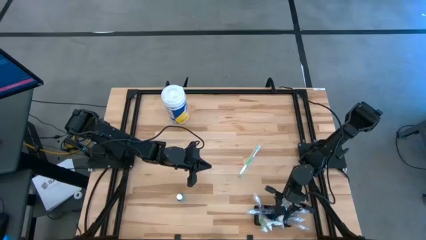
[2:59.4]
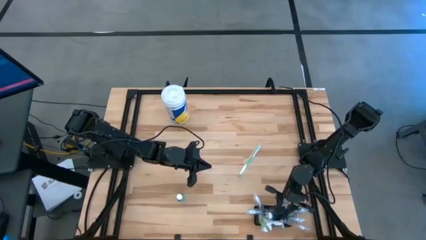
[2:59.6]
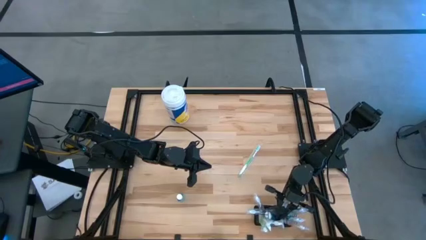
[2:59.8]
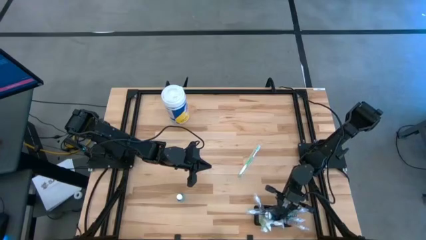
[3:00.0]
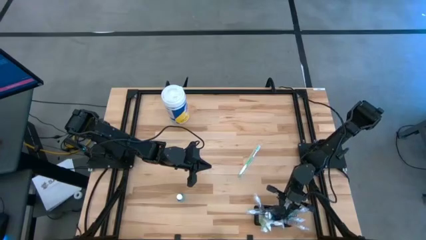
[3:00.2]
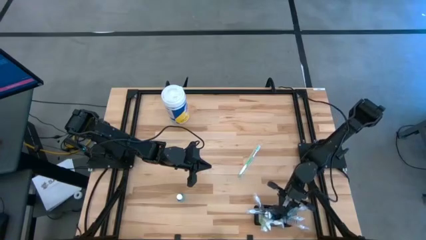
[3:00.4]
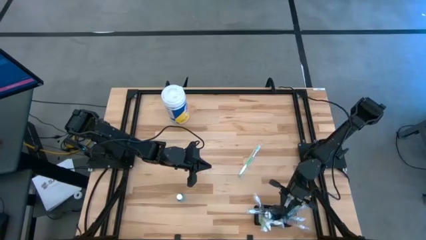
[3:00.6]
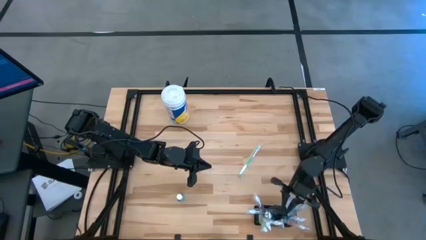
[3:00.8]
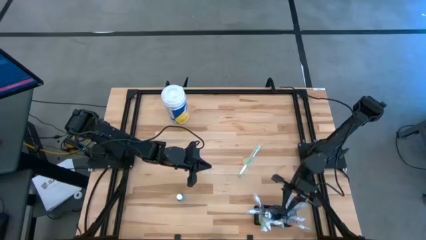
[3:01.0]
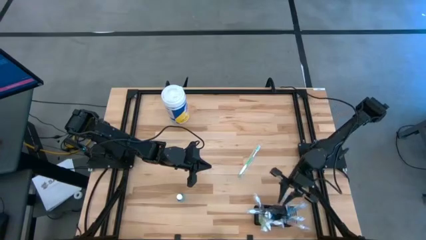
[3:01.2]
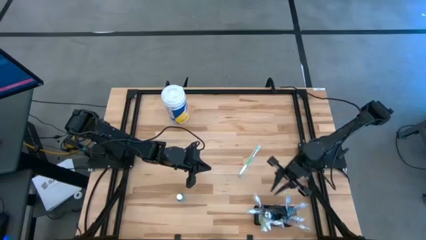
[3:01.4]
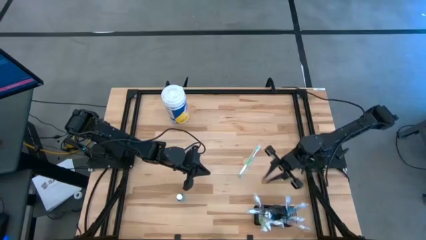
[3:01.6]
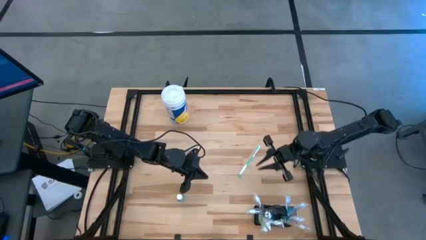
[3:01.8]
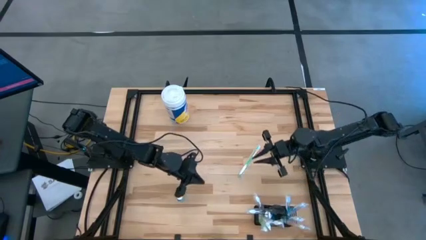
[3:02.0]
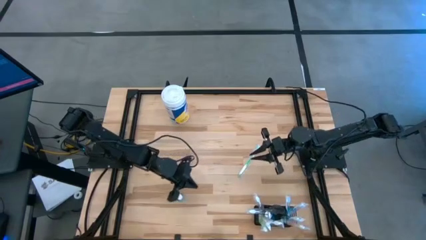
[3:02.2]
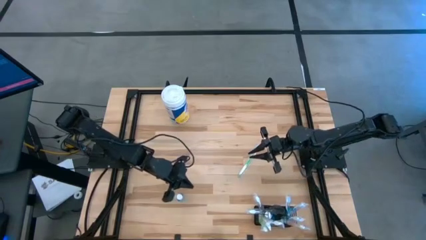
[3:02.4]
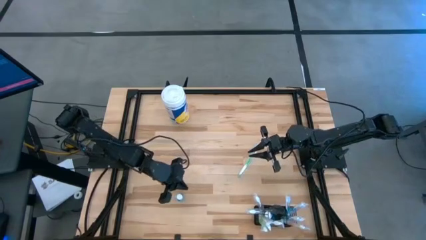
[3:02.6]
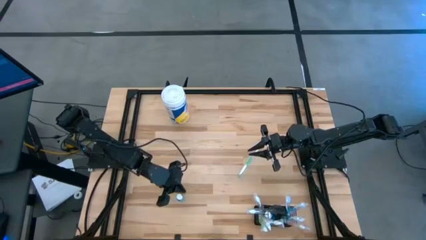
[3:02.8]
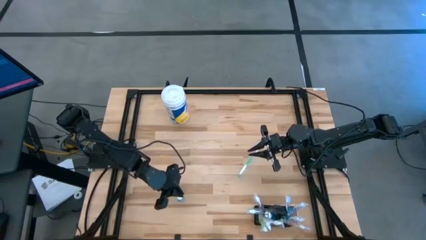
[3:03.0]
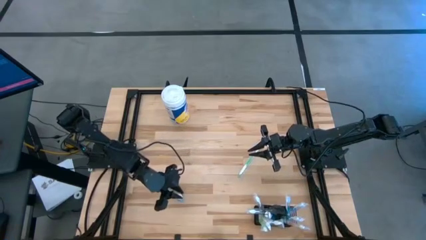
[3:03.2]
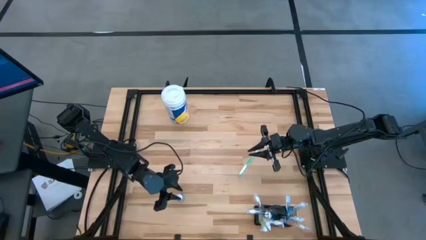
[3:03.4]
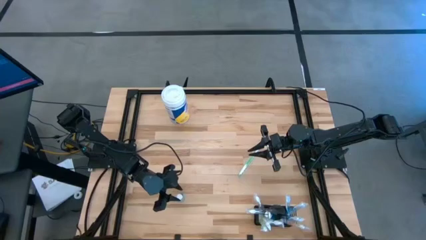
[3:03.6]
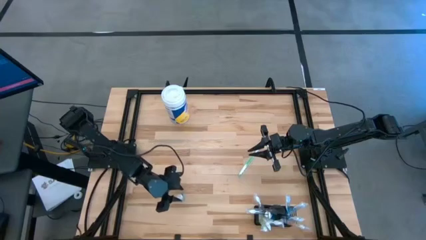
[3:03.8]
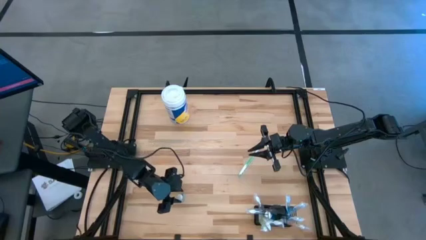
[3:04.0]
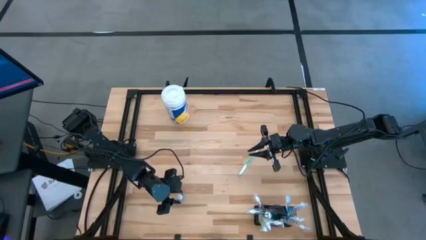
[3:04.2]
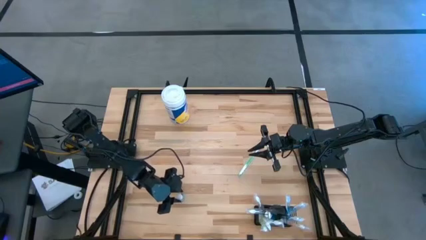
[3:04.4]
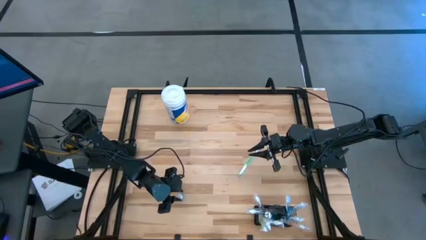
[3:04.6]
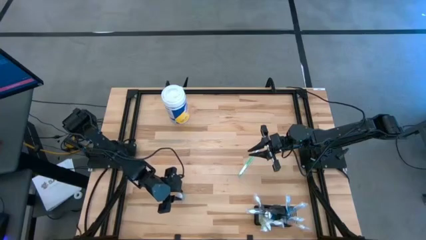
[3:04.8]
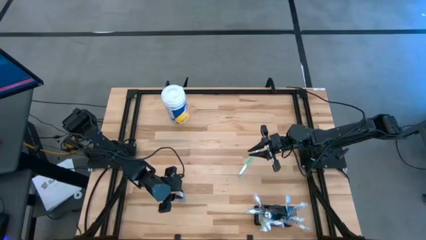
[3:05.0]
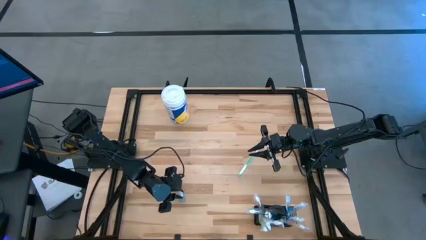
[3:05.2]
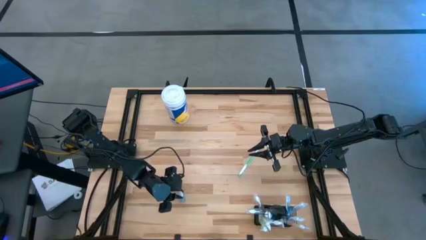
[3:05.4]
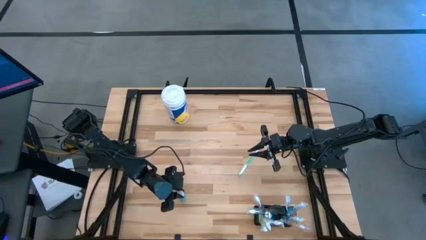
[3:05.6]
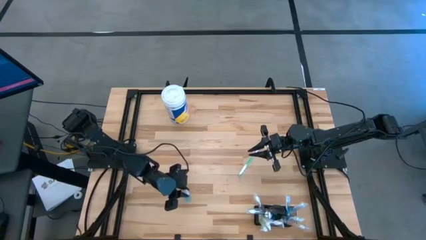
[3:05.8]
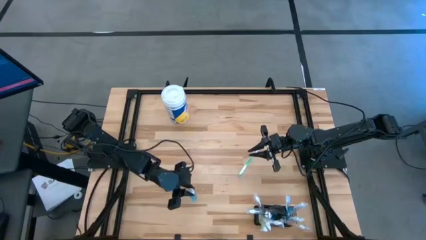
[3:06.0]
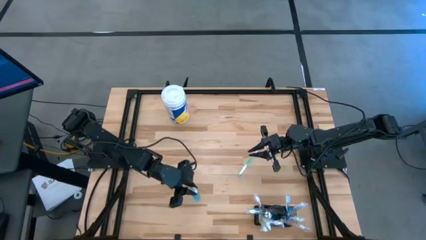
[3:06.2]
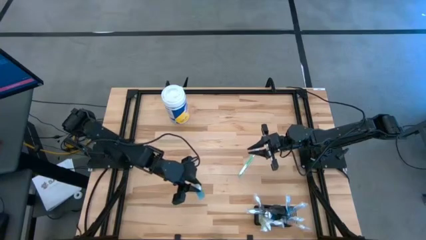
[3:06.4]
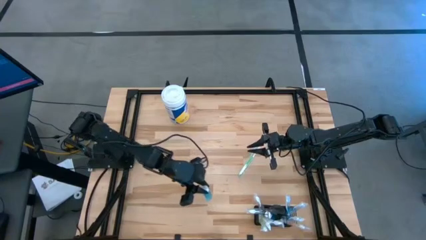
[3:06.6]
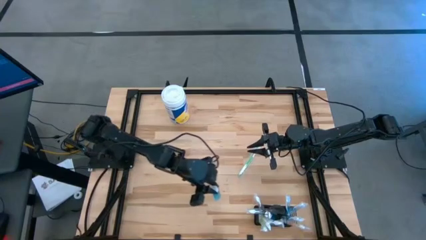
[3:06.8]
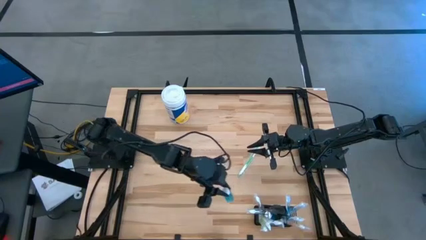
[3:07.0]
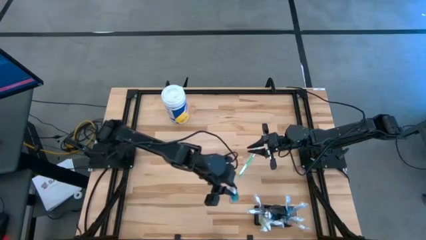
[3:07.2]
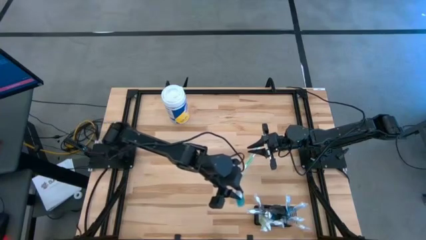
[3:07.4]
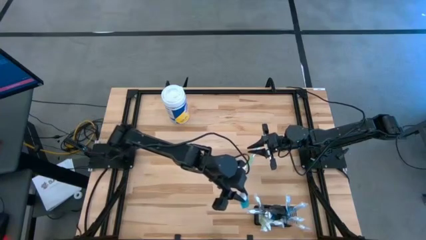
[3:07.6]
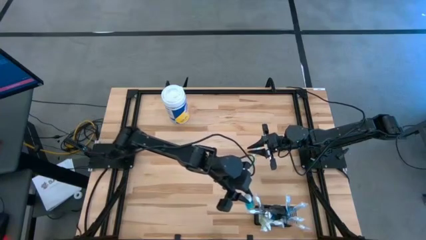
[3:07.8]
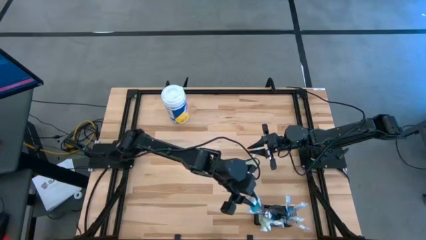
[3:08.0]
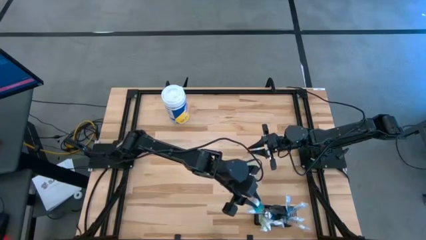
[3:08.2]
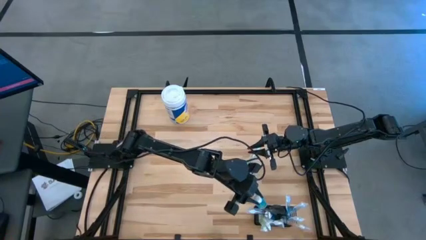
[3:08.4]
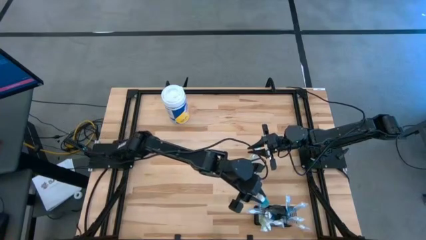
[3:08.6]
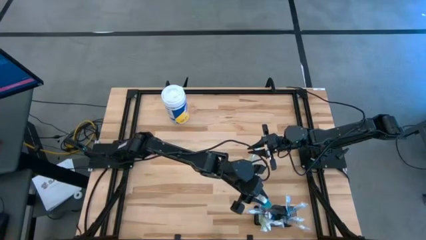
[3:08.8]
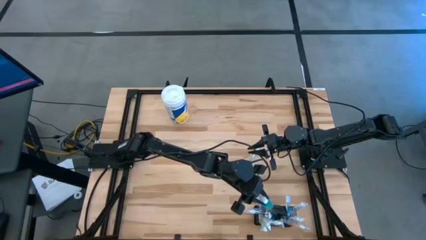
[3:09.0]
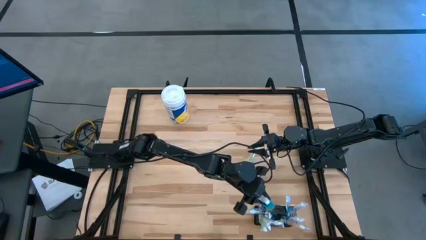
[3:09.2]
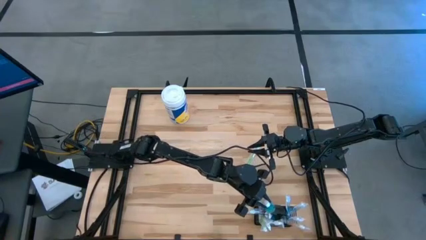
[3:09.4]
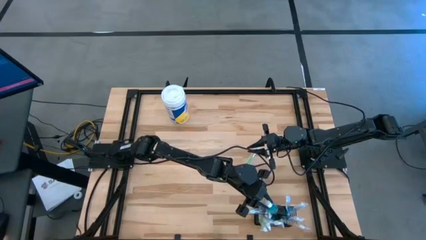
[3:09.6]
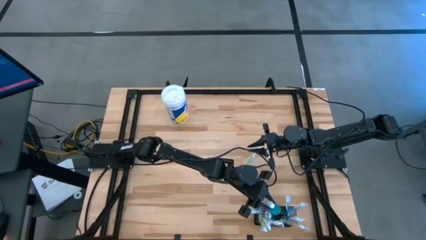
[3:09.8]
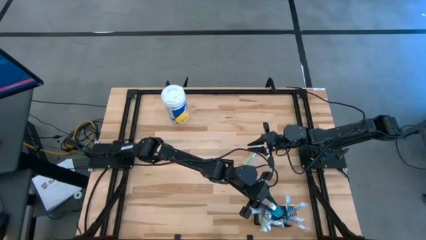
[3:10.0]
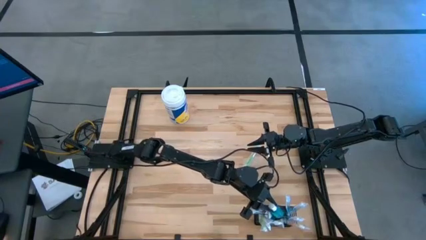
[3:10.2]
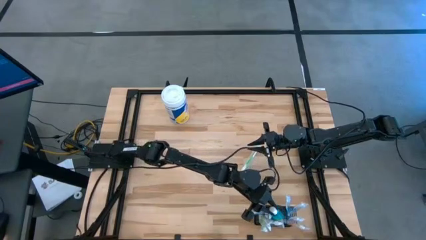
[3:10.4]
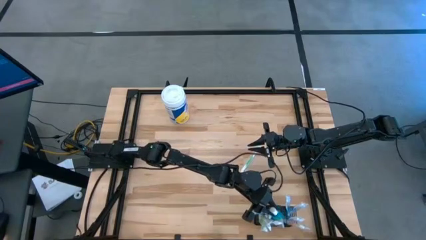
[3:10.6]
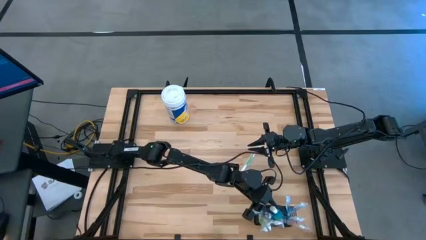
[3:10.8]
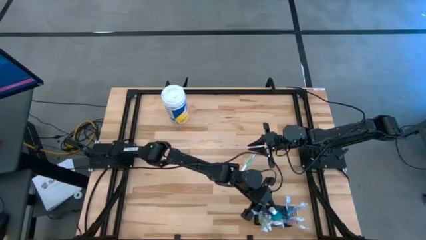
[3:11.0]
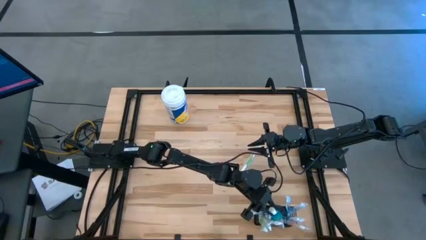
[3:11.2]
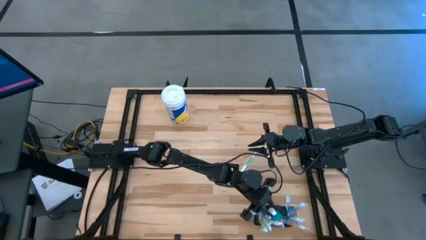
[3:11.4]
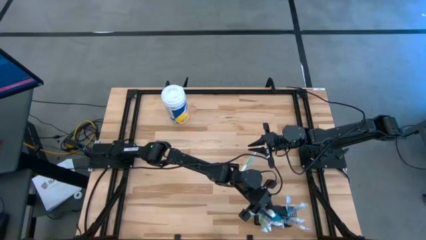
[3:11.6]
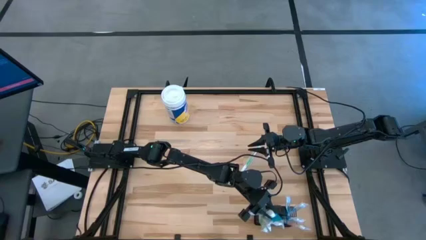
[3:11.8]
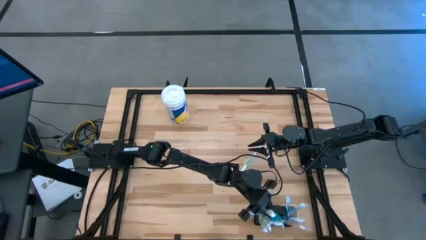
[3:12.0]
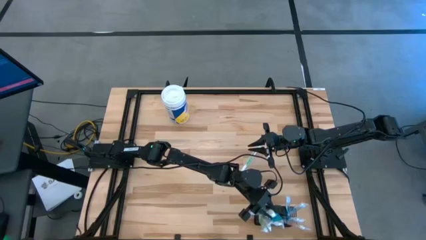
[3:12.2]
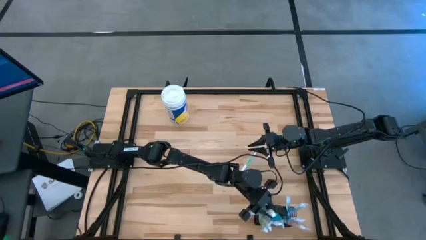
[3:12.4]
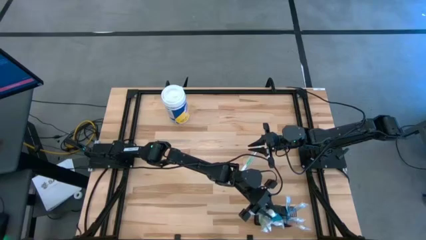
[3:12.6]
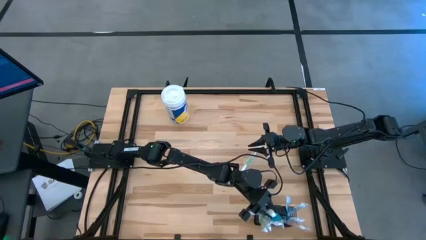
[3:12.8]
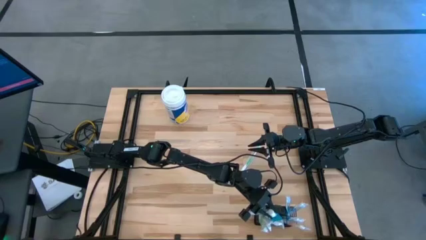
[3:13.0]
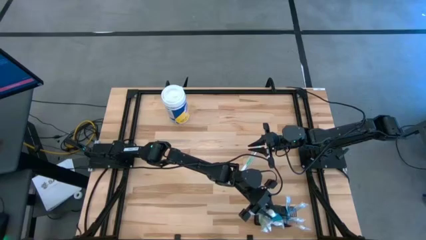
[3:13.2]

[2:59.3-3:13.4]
Task: Pick & Place toothbrushing station
Put the blue mouthwash into the wire organizer
